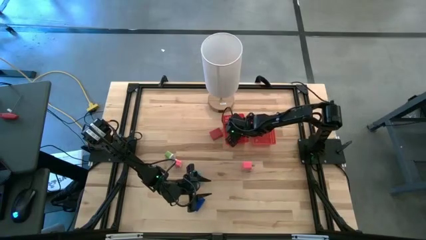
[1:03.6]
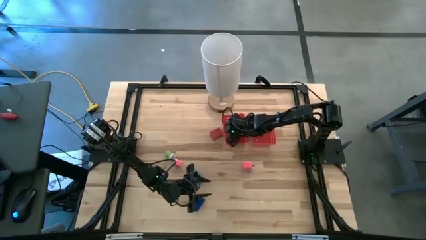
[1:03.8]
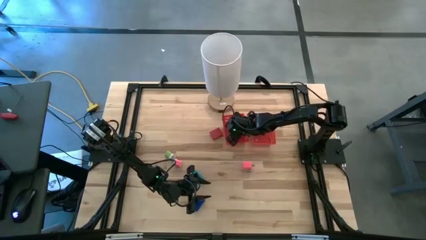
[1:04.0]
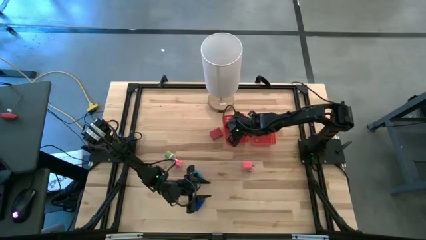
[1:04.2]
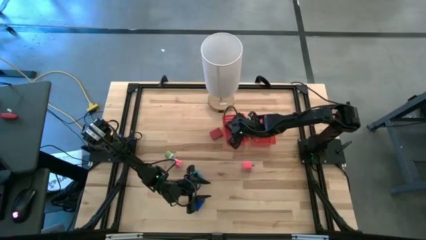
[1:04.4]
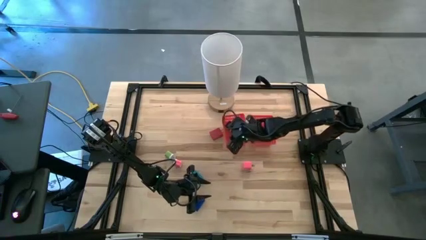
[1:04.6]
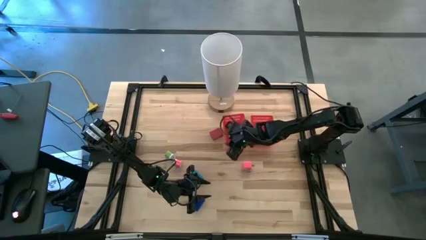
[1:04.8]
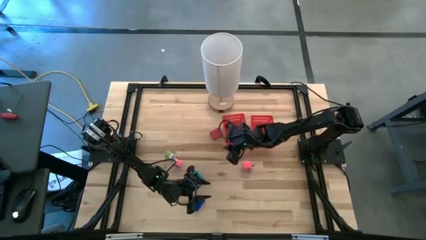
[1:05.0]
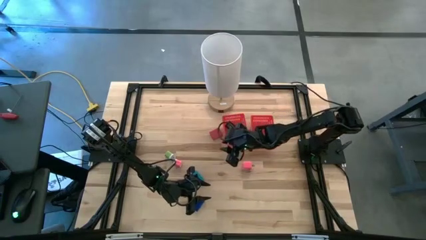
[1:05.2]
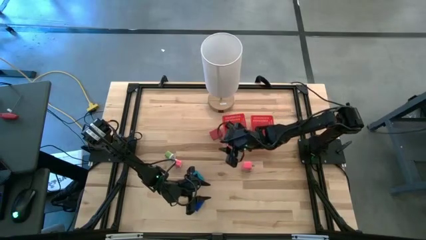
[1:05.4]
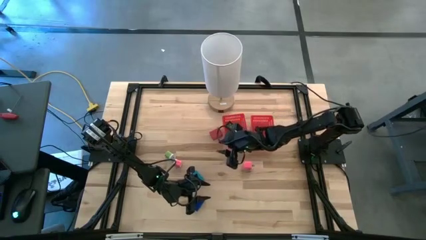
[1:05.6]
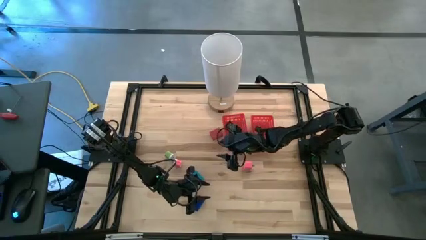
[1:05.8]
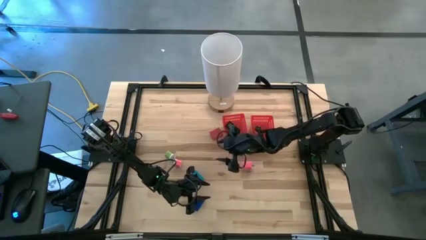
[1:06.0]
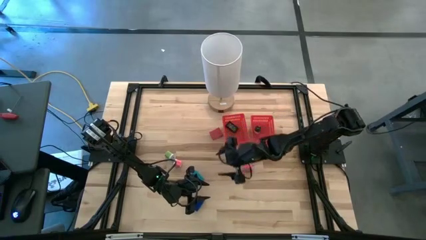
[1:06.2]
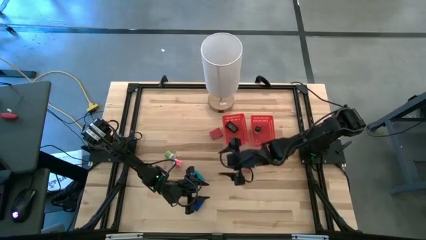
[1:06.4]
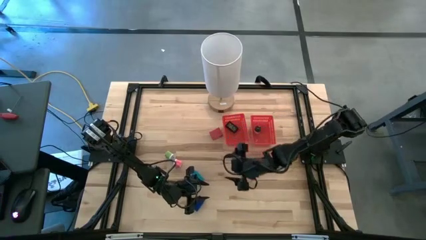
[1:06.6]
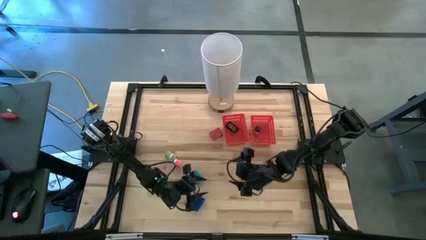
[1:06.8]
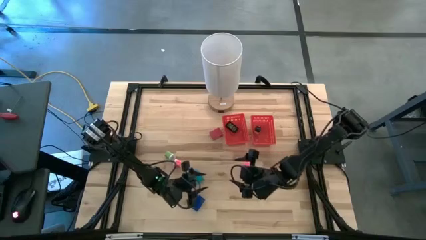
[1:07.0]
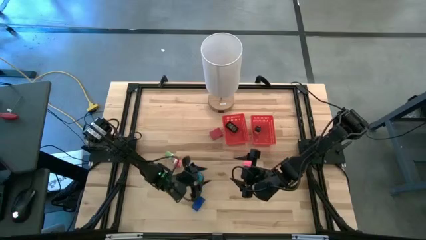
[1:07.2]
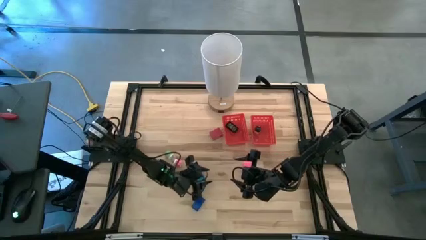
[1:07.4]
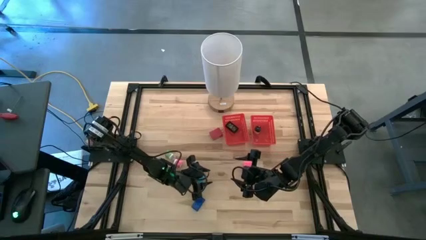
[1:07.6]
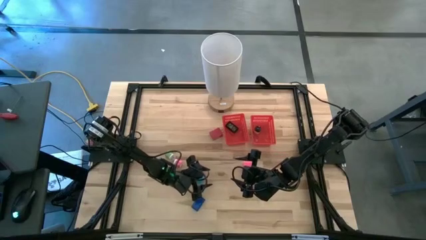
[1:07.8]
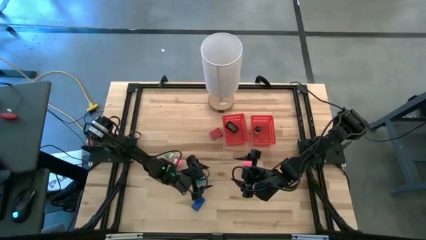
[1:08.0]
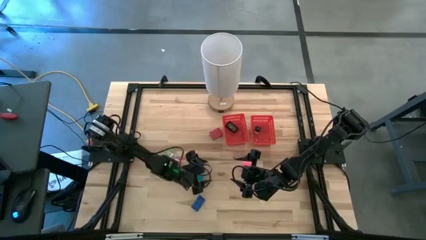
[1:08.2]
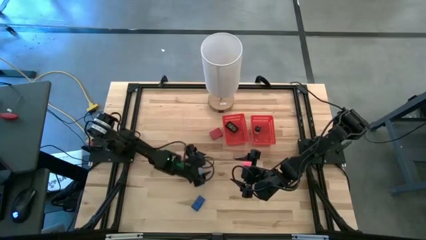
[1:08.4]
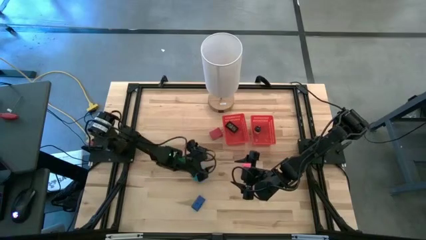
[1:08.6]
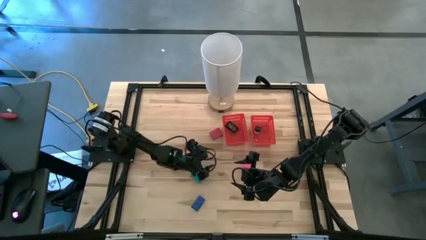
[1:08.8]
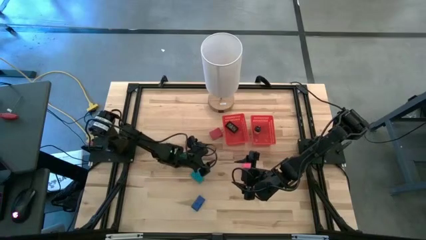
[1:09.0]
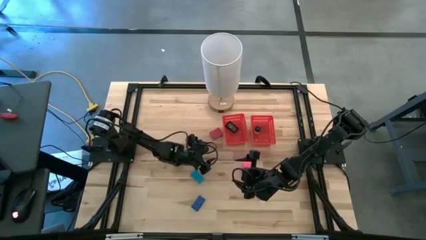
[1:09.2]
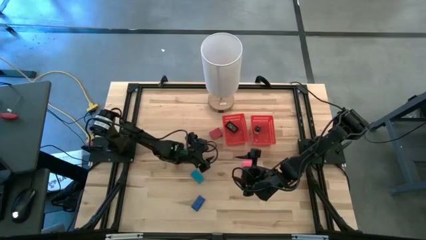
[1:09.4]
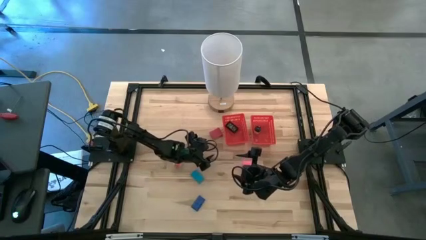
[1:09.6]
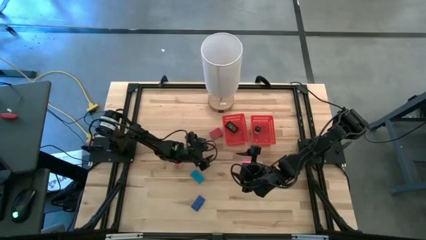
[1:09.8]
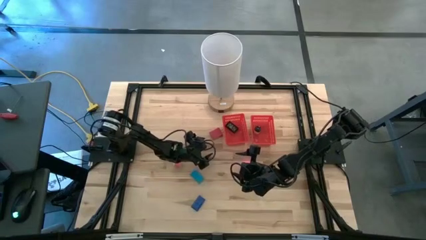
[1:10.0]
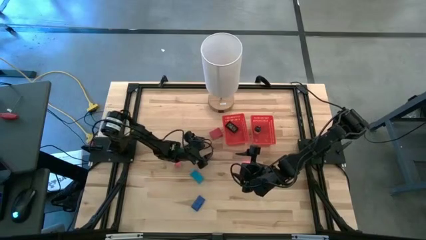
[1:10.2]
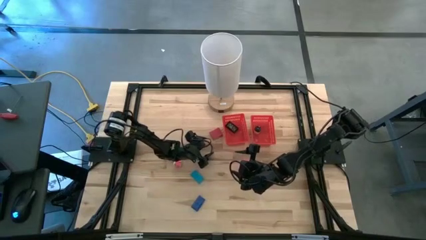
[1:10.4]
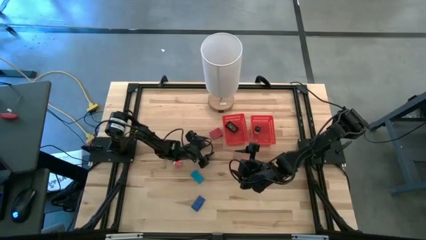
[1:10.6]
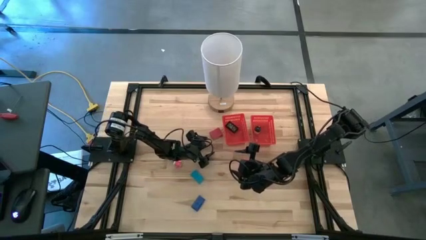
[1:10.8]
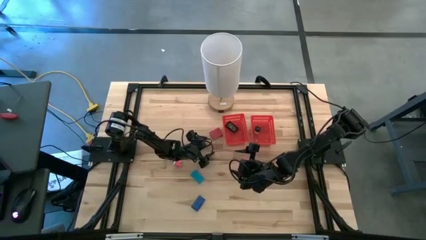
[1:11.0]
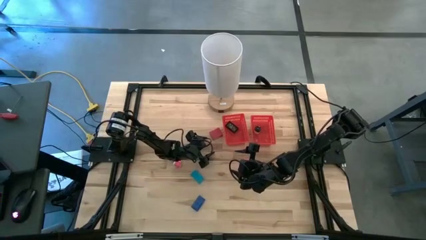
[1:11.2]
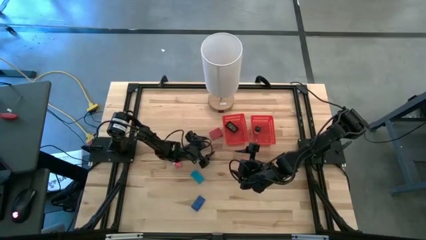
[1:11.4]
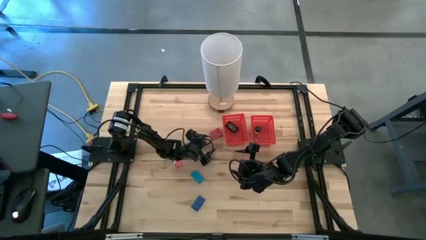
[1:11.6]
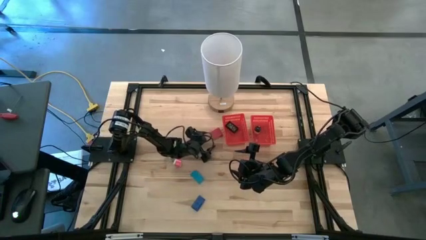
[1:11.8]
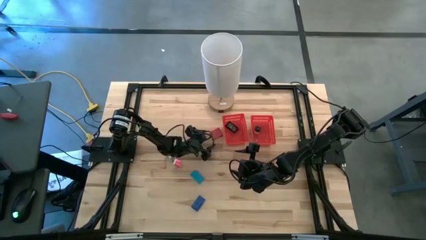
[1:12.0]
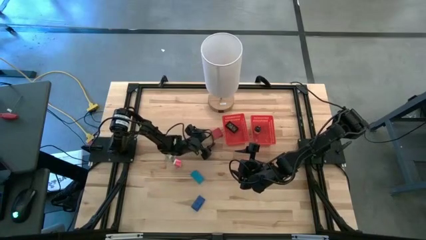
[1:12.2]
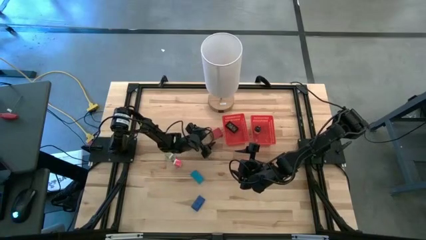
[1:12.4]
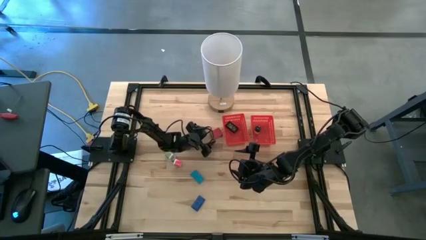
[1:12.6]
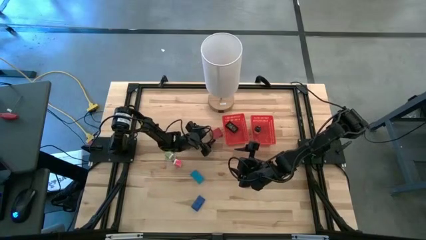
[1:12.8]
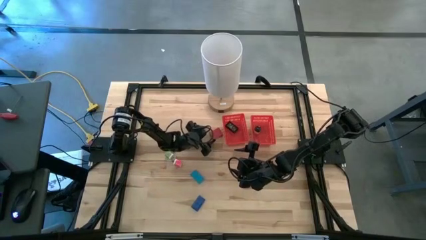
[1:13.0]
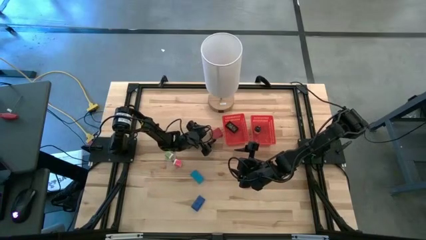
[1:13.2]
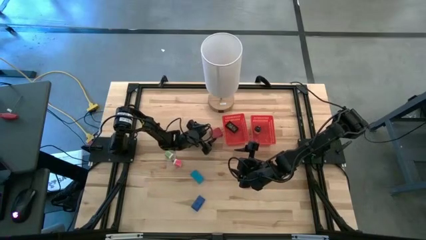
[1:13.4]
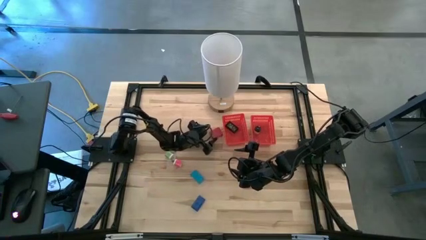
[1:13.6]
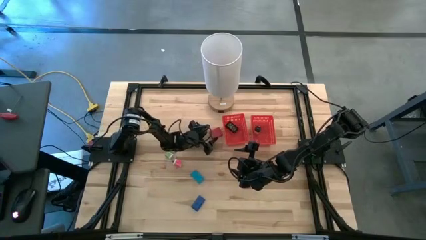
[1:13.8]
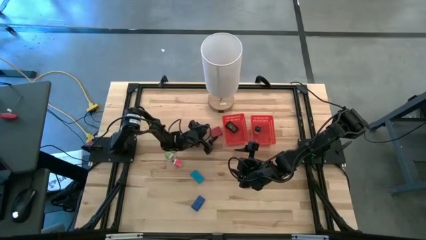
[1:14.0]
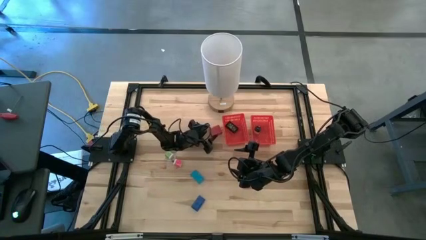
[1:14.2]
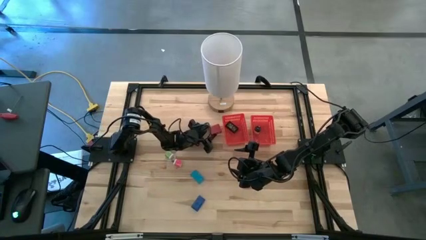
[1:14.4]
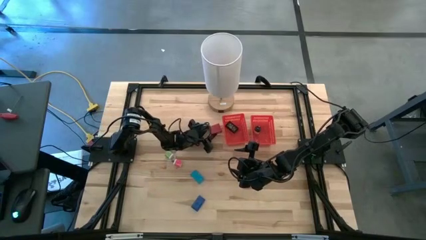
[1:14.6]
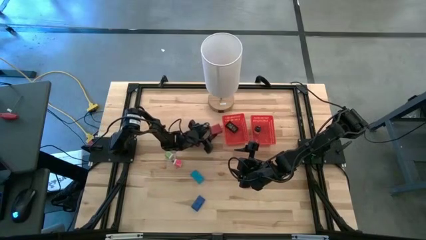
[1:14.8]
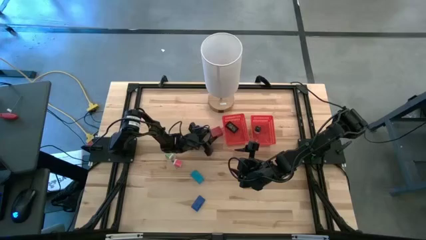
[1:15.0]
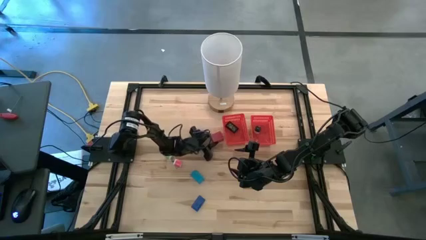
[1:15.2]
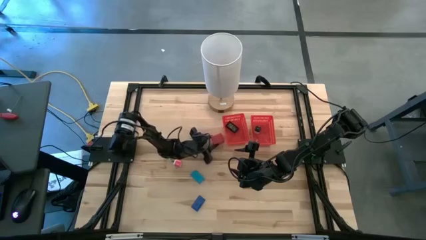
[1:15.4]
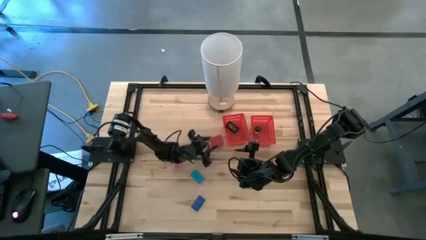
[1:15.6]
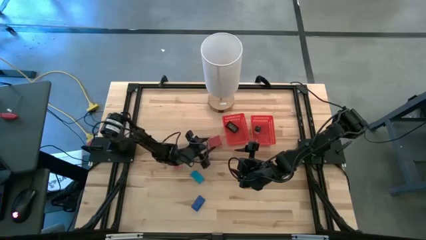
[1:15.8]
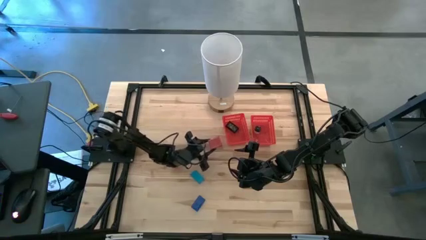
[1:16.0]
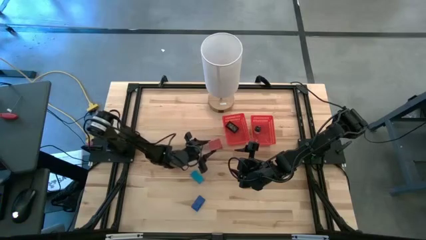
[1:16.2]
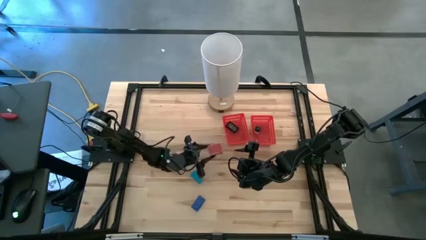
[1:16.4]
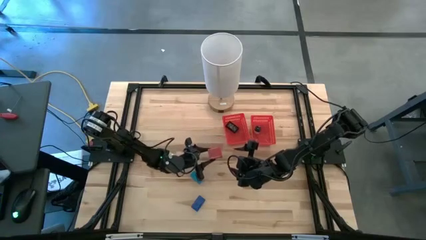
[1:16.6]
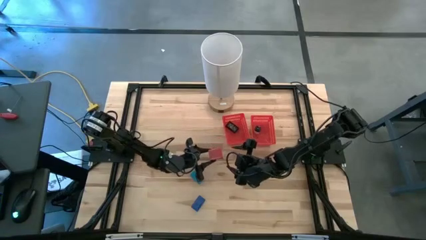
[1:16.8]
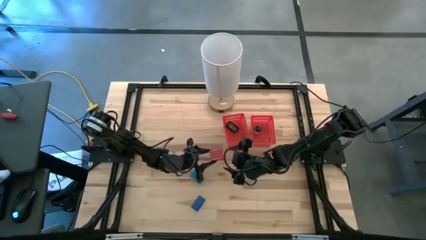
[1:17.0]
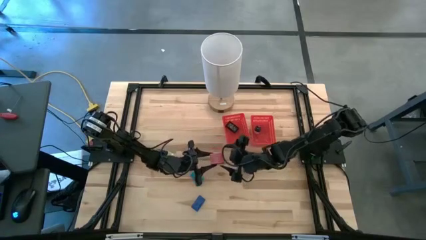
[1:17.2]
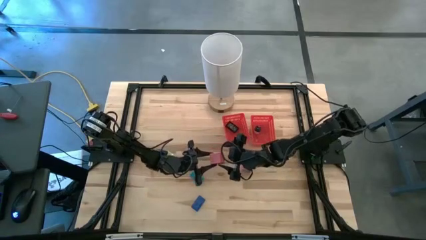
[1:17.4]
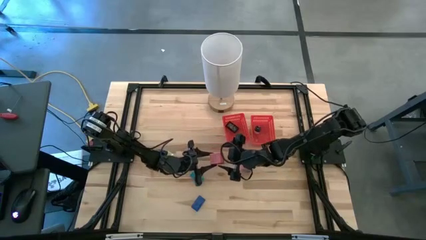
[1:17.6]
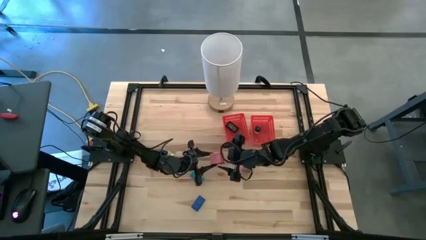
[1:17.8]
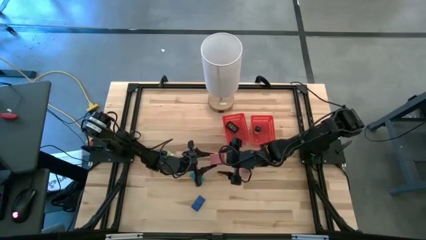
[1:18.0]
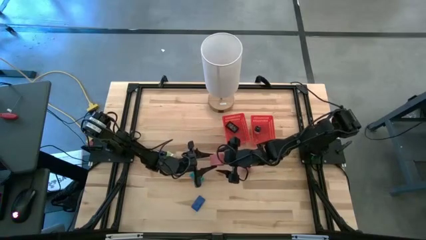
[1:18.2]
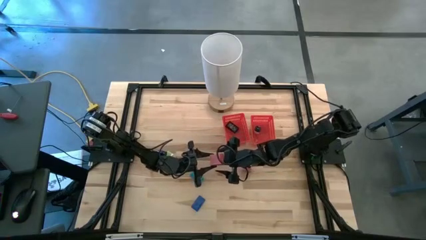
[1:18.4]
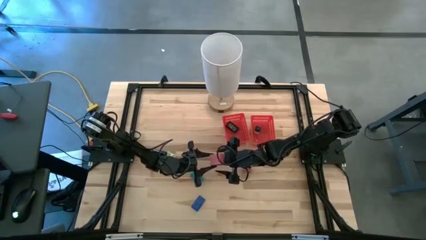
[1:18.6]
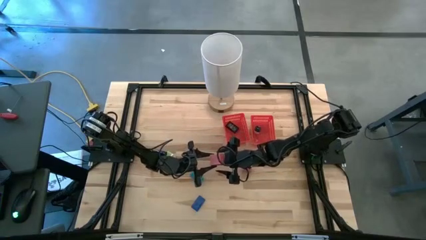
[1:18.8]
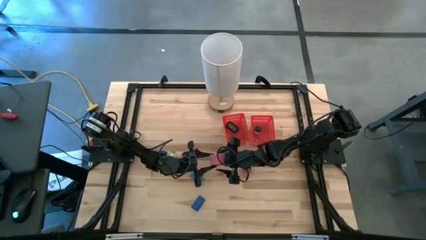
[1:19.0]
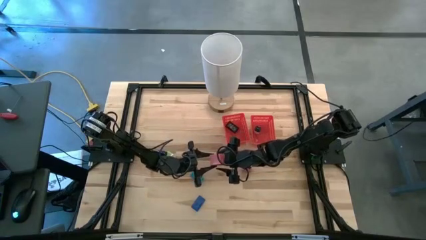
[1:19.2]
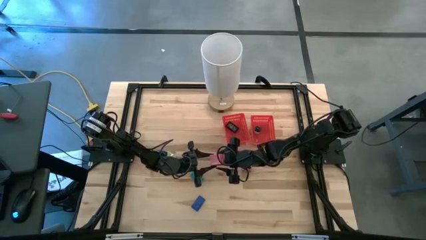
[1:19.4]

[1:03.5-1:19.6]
Task: Pick & Place Office items
Put the red charger adapter into the right red bin

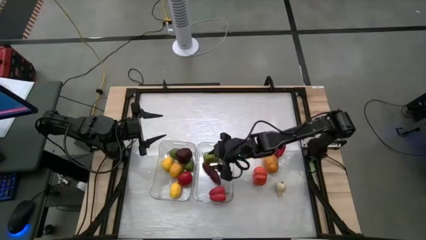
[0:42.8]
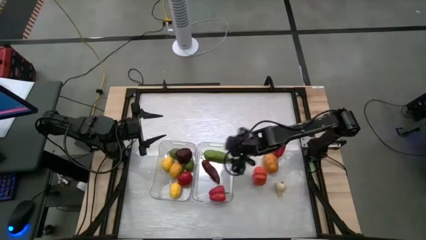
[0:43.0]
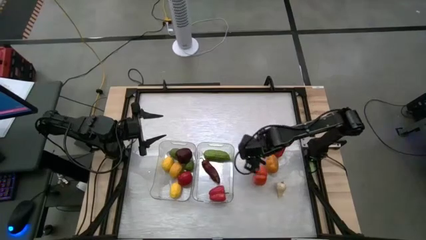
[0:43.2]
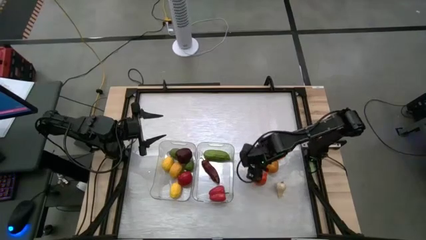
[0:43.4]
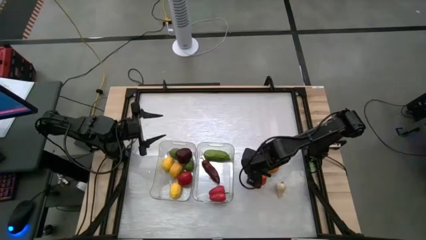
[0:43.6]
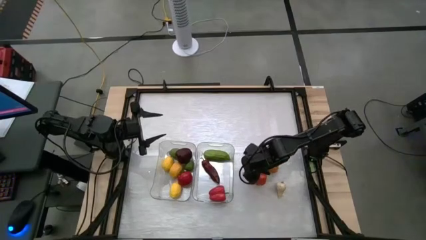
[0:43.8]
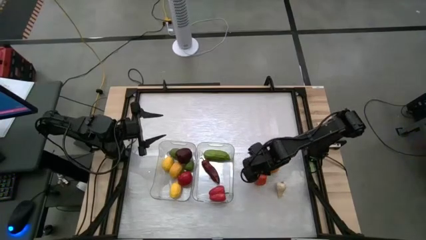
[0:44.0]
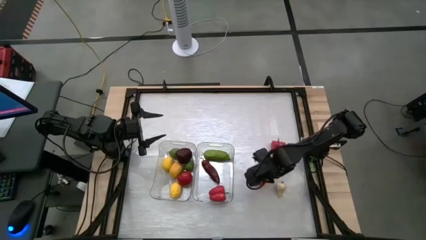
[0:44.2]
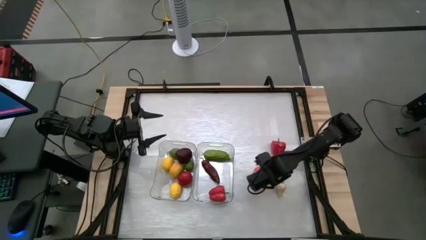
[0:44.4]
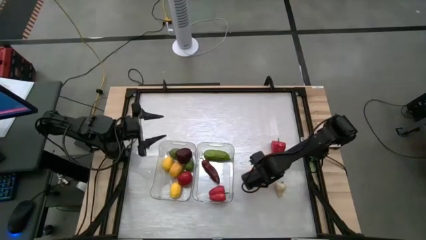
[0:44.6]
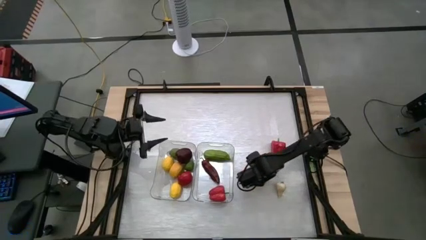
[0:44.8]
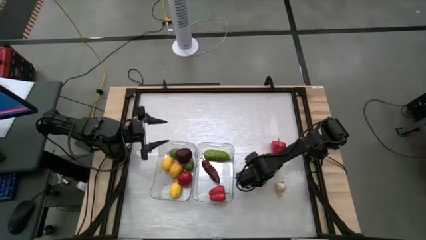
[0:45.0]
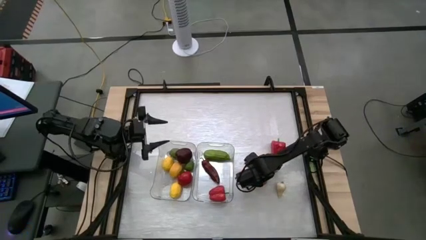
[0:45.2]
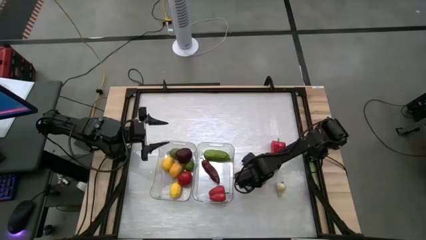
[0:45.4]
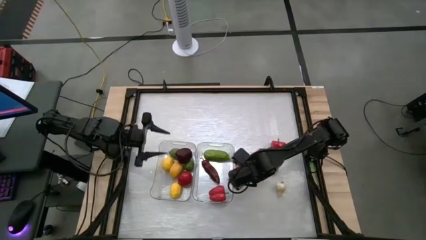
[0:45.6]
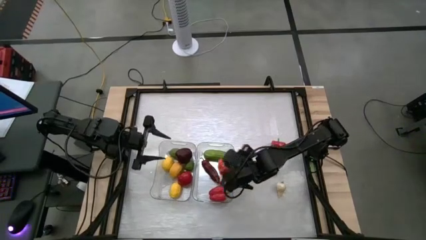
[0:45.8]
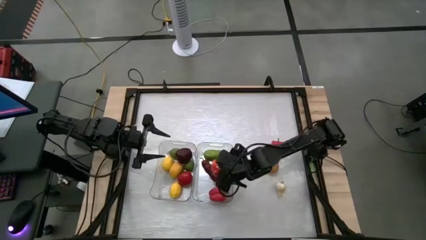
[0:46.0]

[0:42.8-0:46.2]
Task: Sort produce into baskets
Put the bottom orange bell pepper into the right transparent bin
